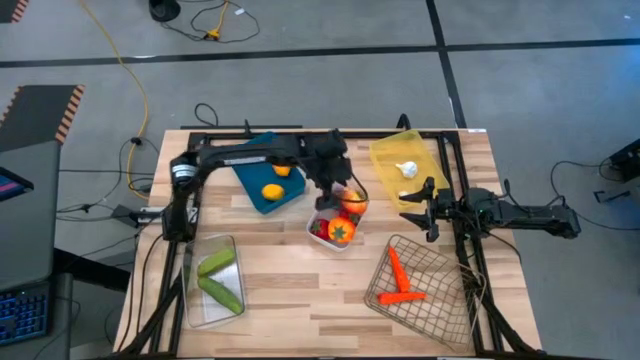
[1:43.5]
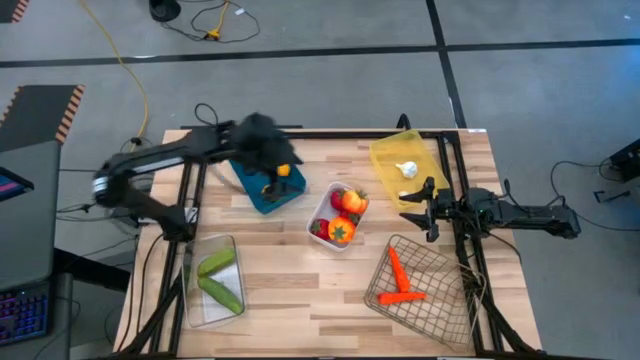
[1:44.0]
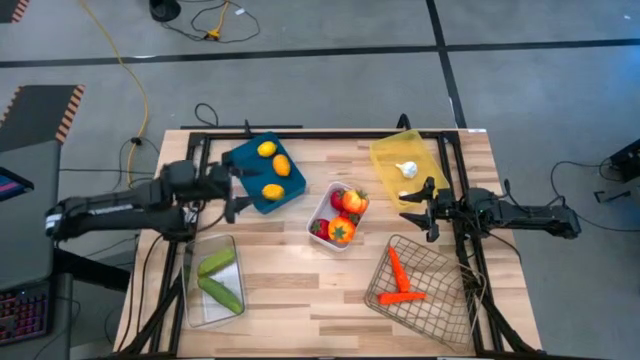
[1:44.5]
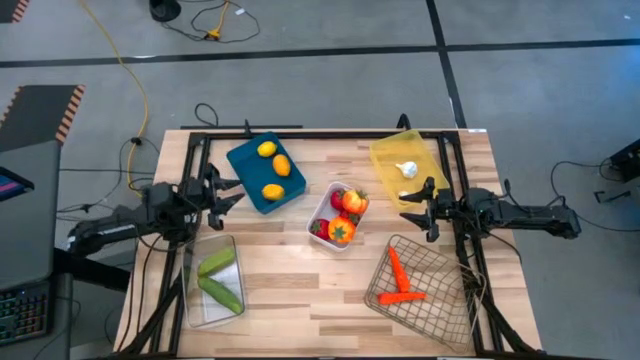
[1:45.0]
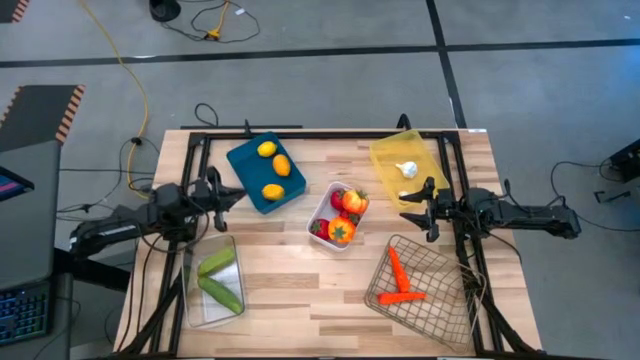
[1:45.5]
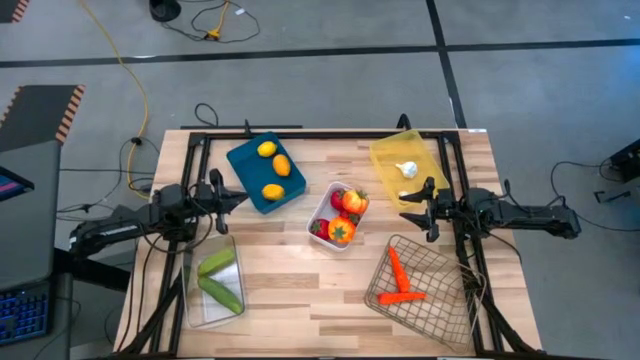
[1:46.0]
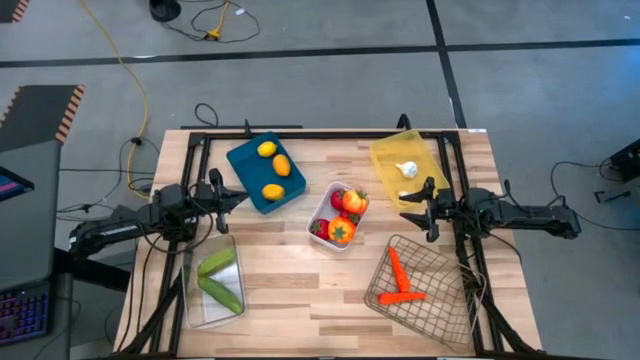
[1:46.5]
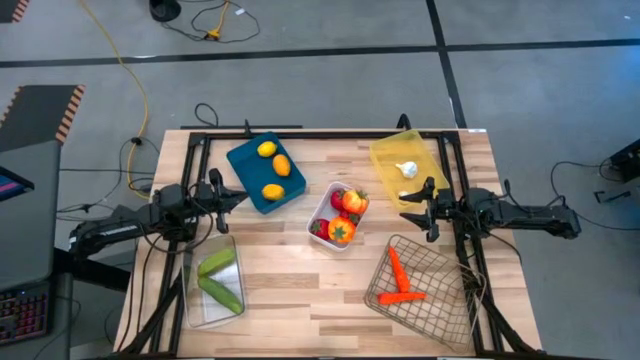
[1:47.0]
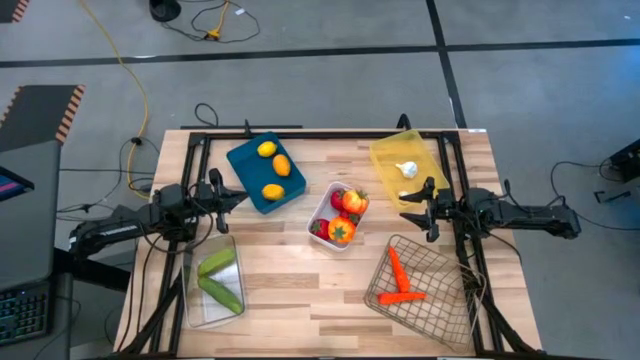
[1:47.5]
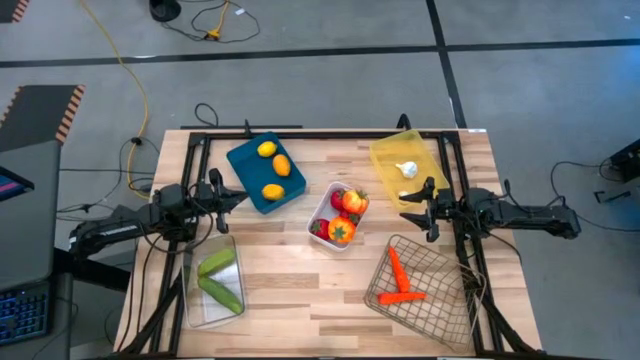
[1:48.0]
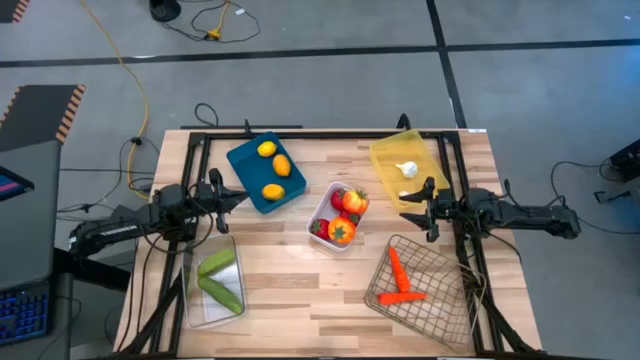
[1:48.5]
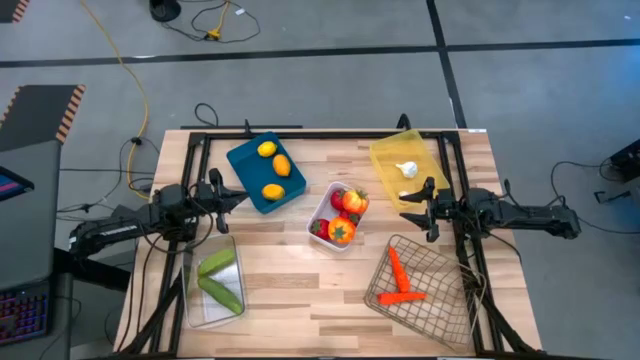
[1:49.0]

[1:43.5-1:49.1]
Task: Sort produce into baskets
Return to Home Position

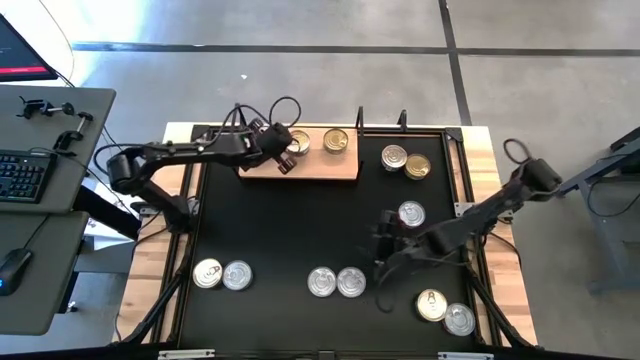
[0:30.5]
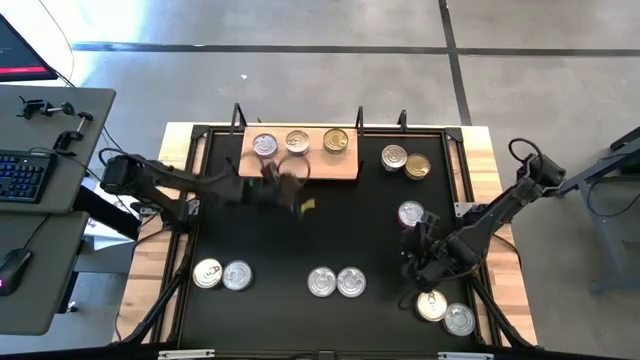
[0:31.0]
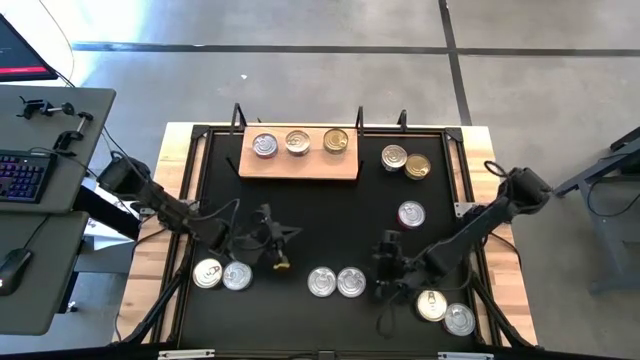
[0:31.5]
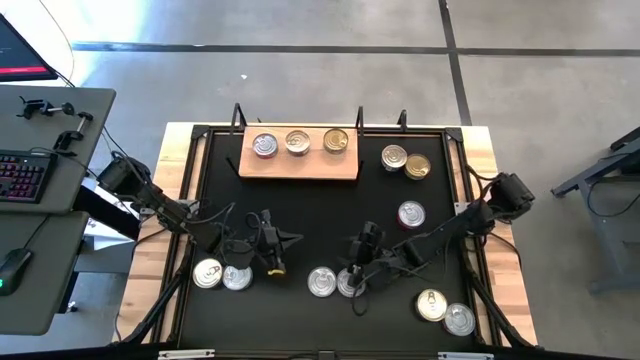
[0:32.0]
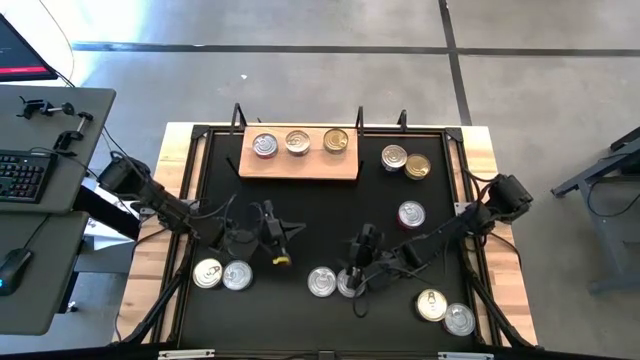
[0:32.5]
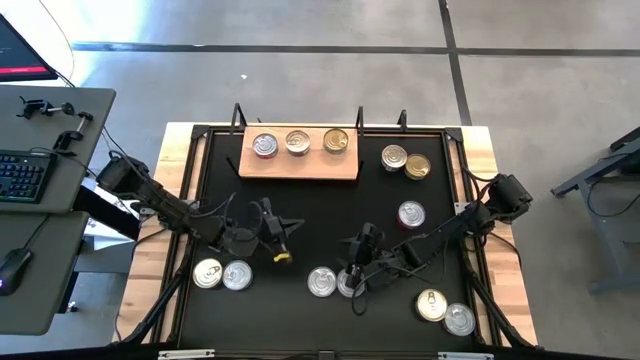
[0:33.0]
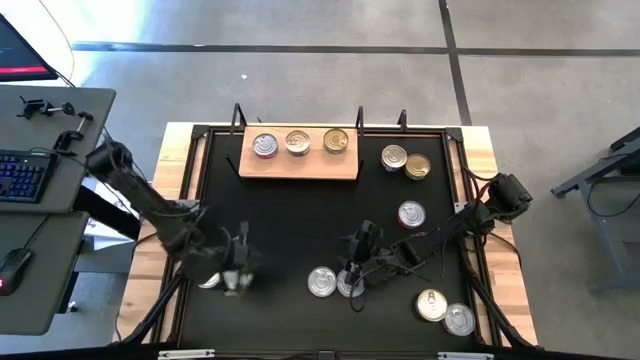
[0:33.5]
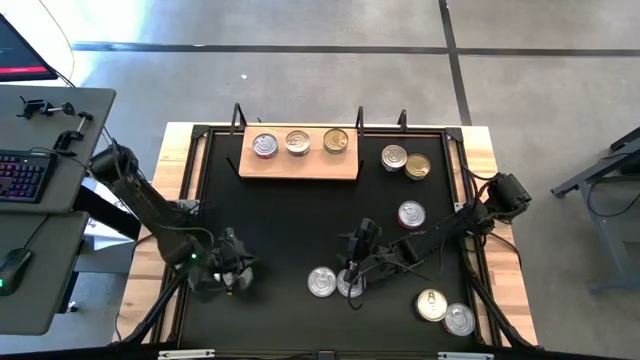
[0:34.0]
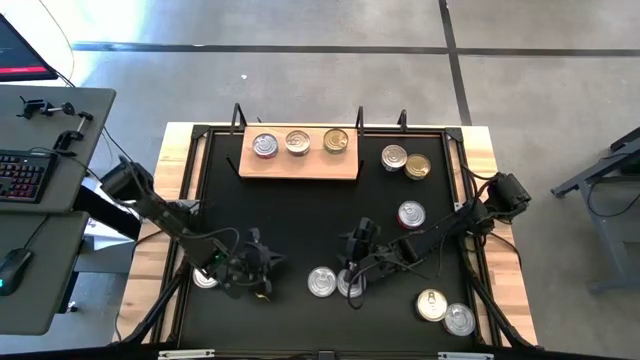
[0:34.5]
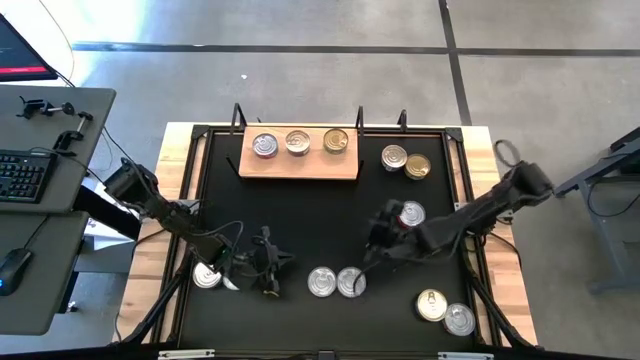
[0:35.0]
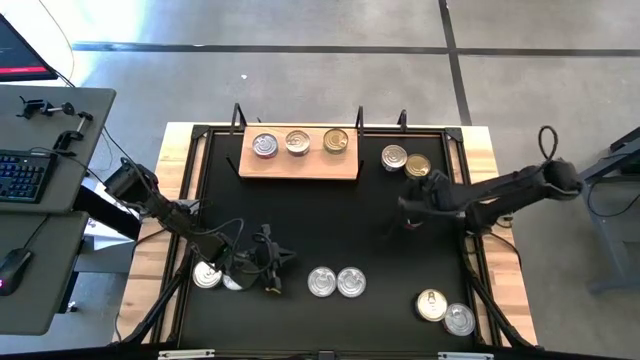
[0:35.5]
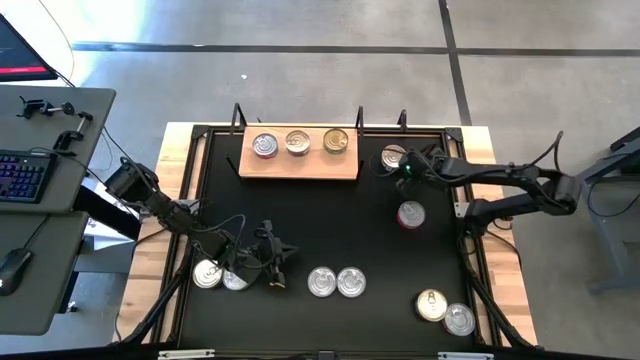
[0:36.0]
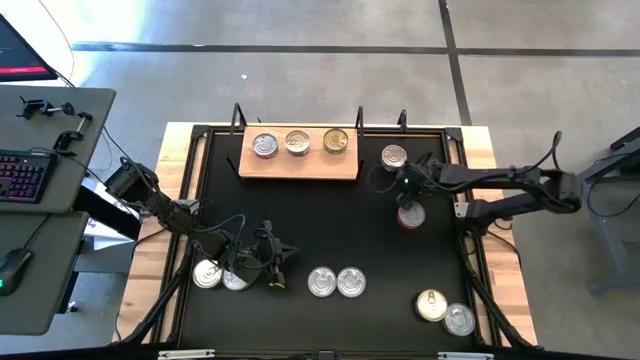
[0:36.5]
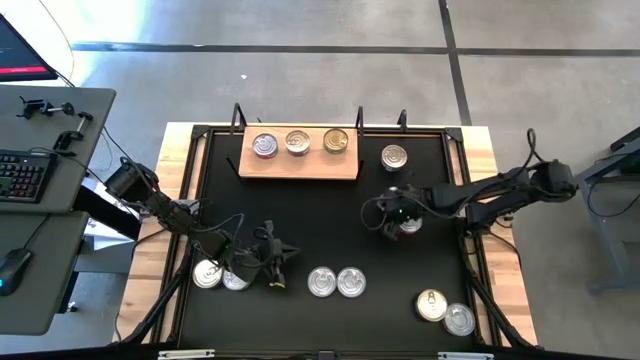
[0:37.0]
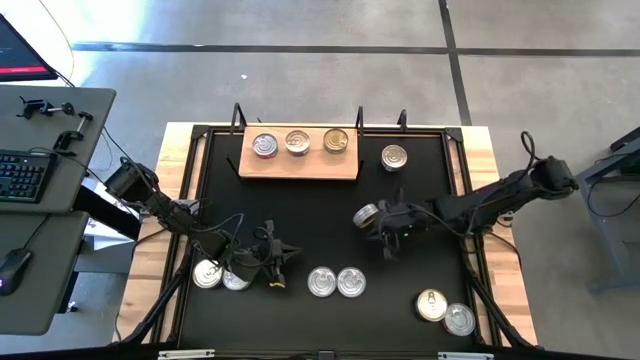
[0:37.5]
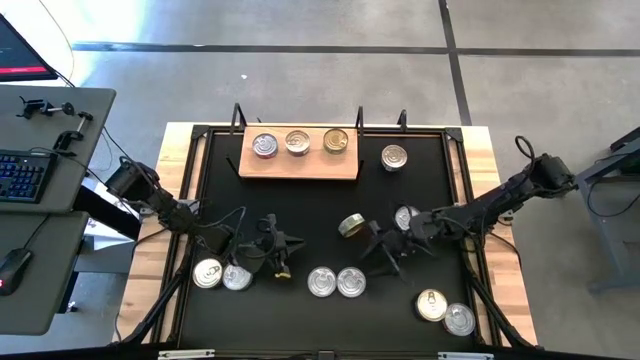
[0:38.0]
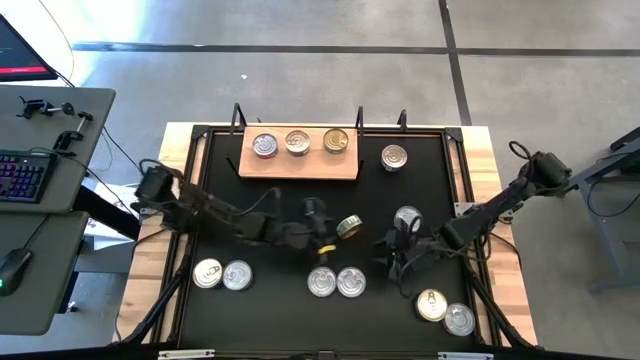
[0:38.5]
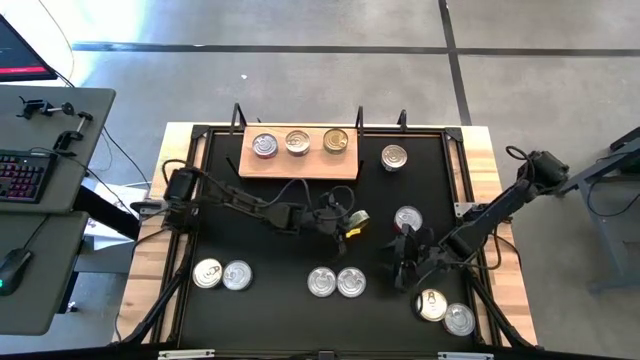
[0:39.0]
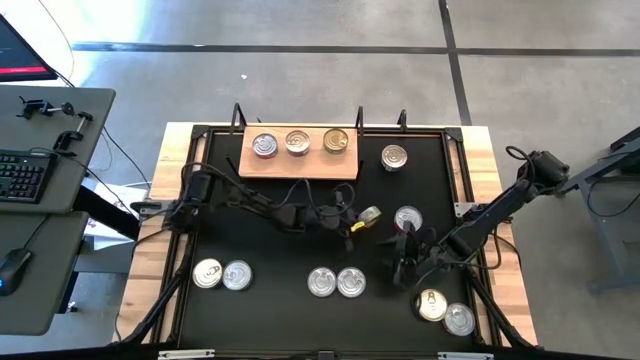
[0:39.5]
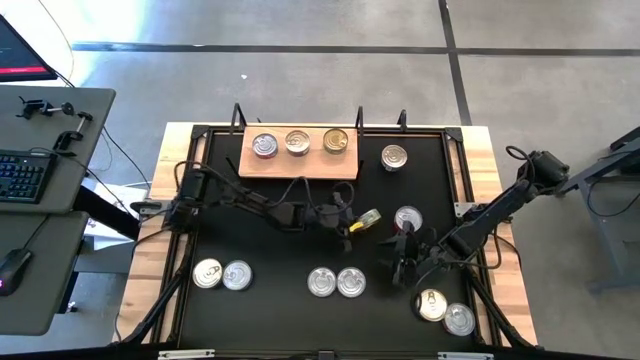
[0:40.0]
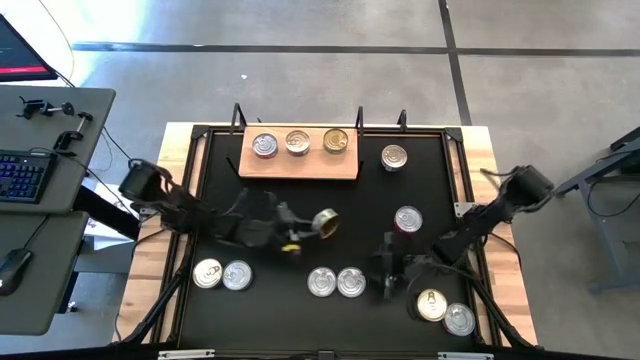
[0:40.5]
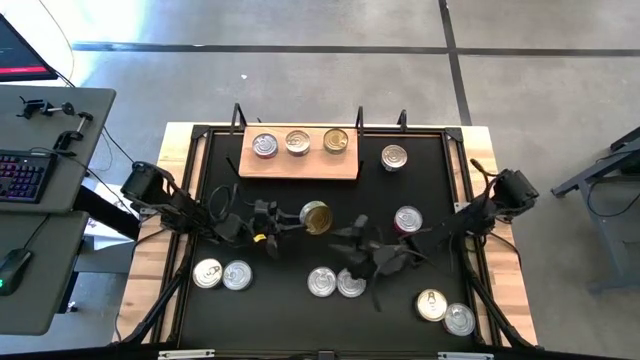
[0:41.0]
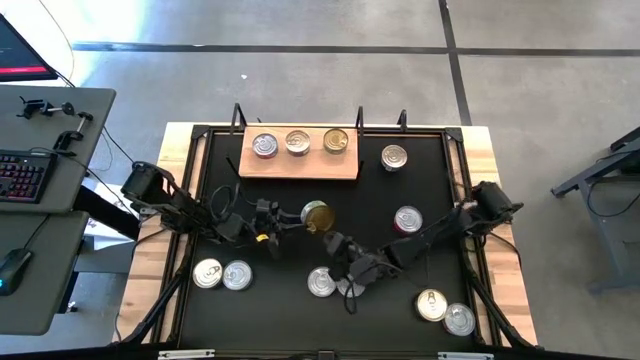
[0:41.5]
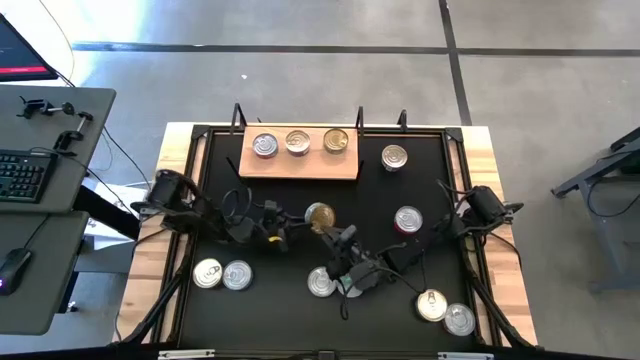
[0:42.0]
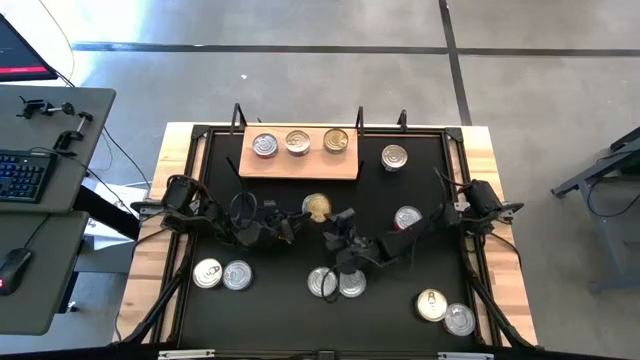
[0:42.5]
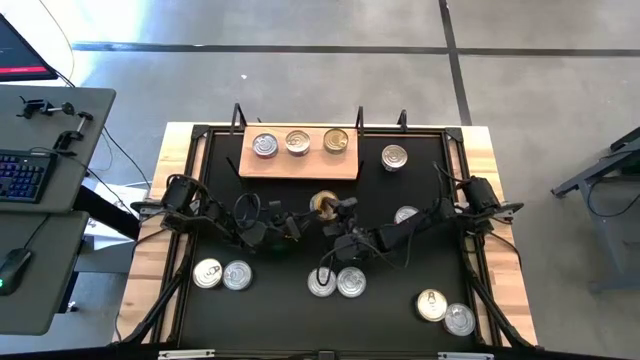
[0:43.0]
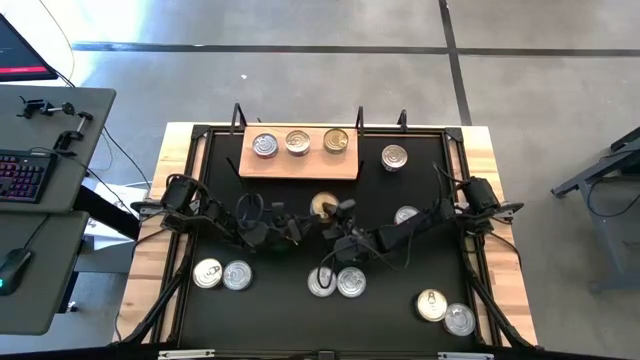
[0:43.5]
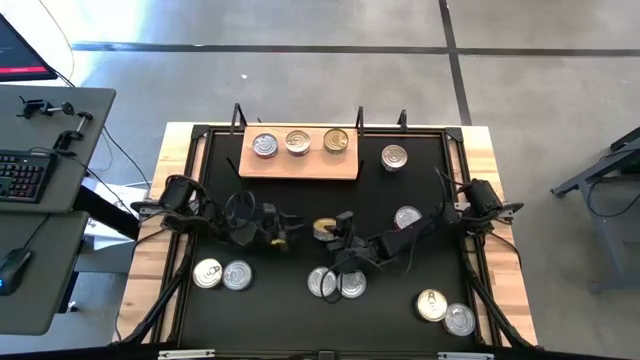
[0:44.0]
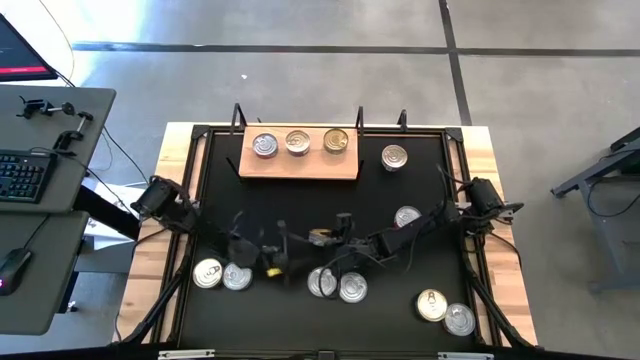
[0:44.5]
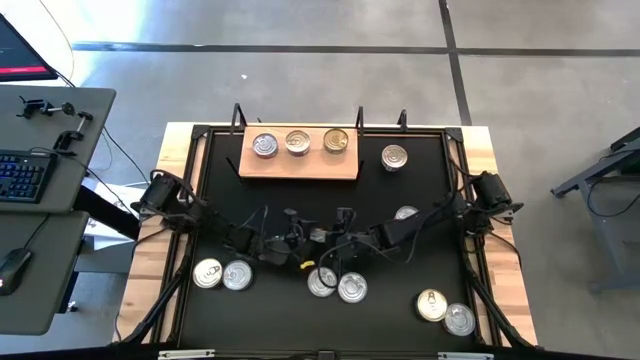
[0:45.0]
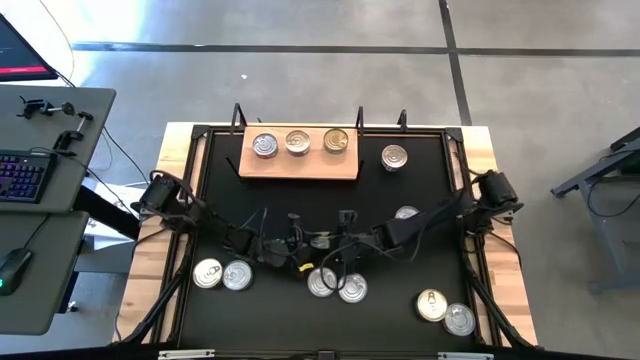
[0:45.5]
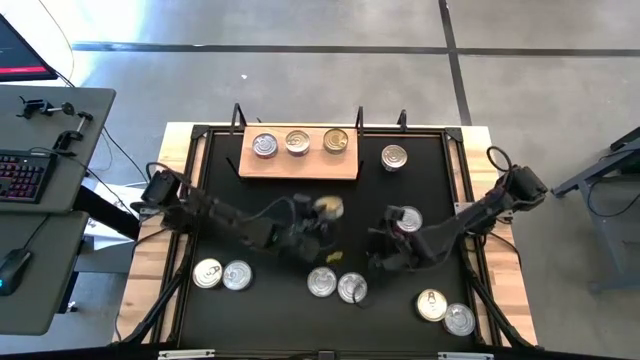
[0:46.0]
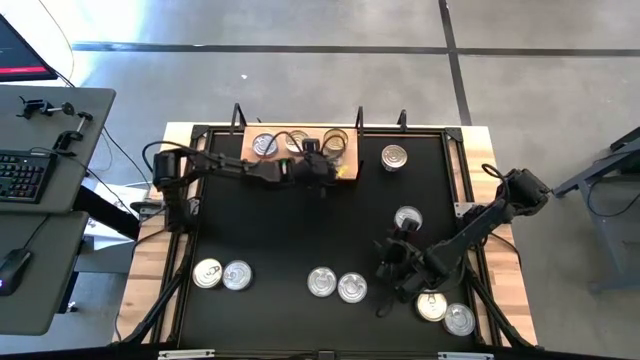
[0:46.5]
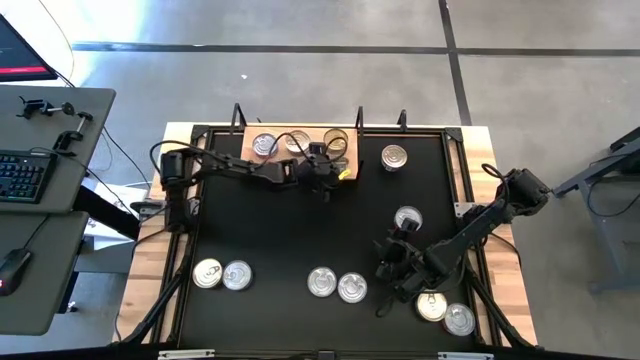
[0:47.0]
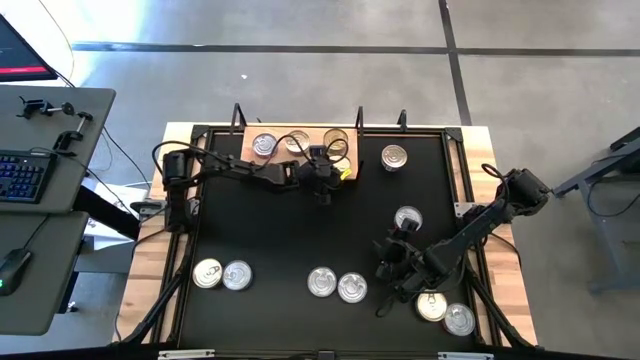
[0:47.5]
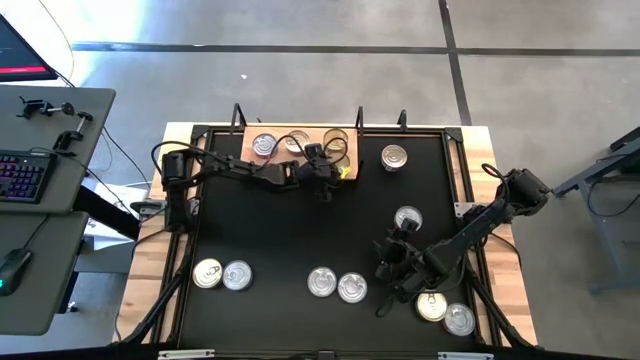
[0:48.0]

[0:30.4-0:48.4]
Task: Stack canned seafood by type on shelf
Put the green tuna can on the shelf aligned with the other green tuna can
